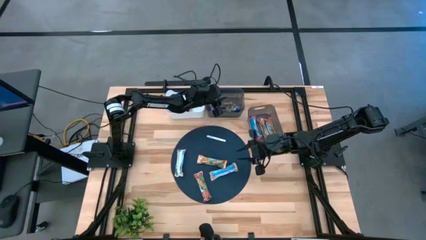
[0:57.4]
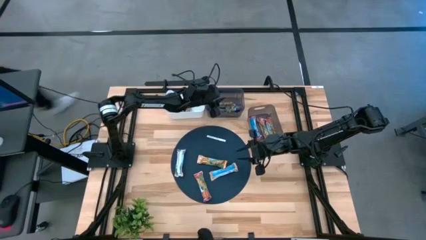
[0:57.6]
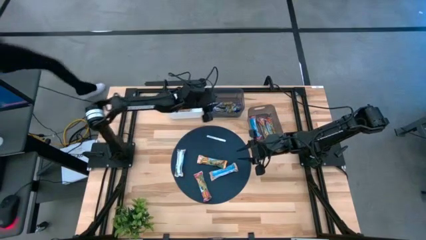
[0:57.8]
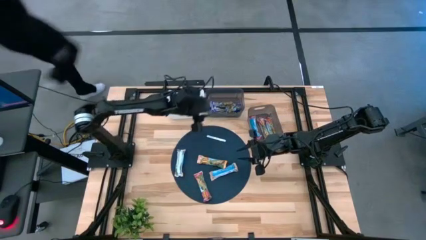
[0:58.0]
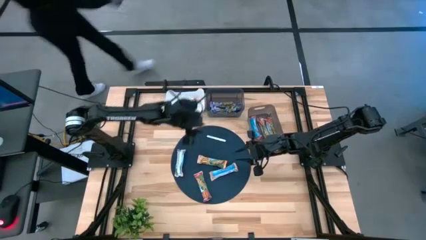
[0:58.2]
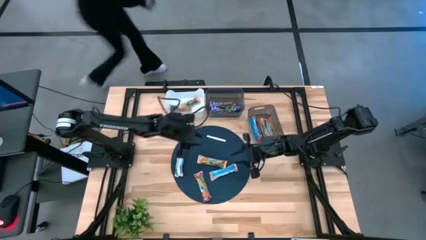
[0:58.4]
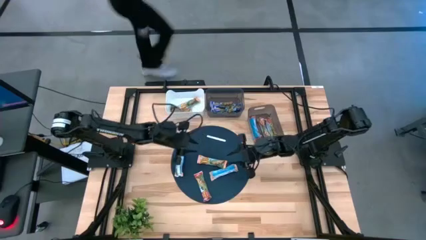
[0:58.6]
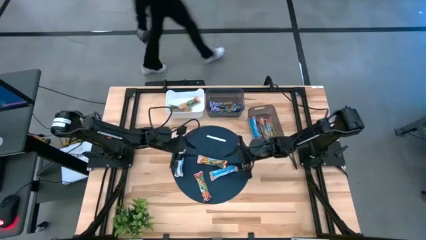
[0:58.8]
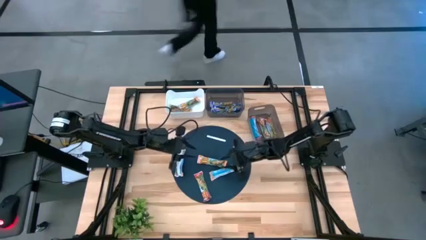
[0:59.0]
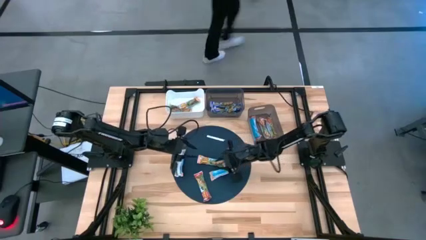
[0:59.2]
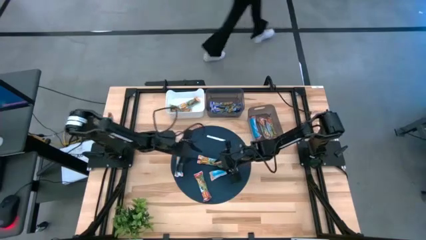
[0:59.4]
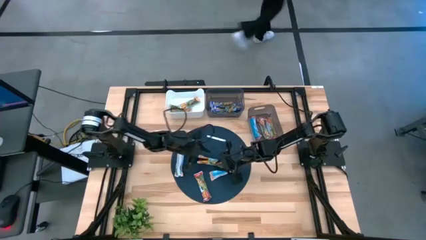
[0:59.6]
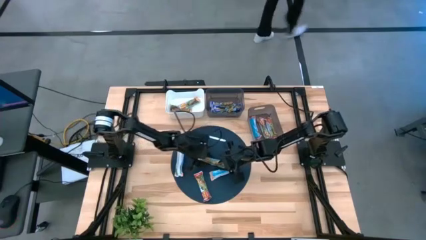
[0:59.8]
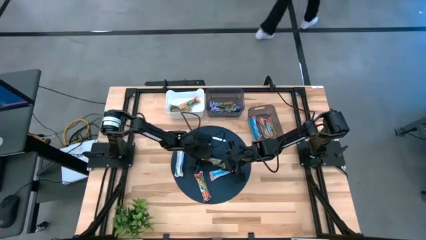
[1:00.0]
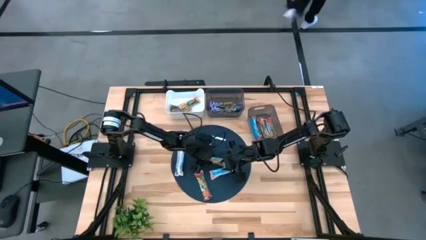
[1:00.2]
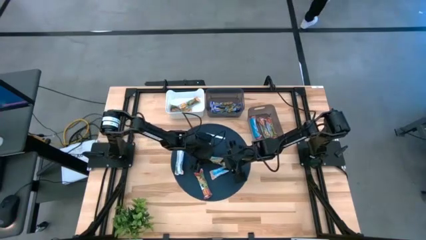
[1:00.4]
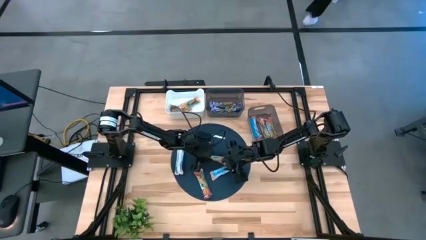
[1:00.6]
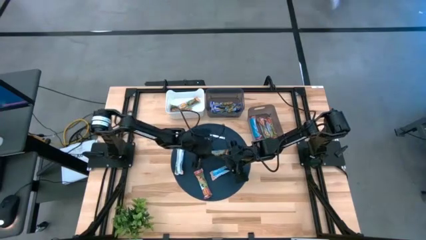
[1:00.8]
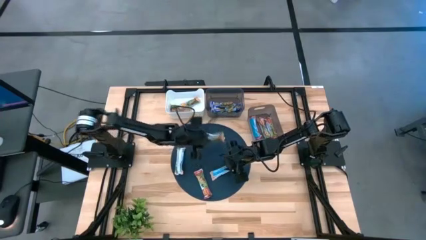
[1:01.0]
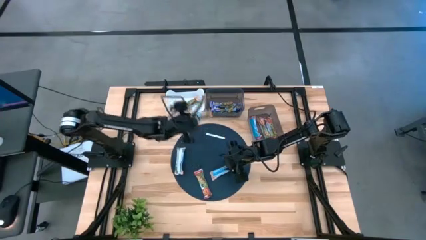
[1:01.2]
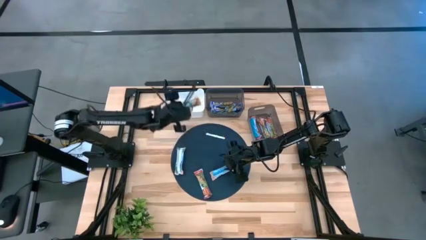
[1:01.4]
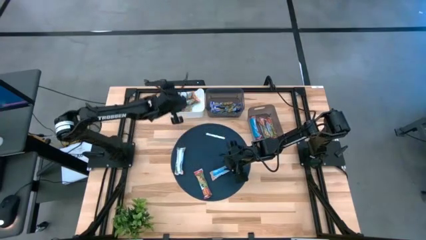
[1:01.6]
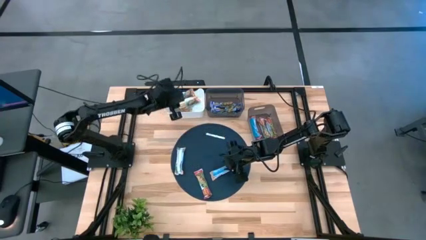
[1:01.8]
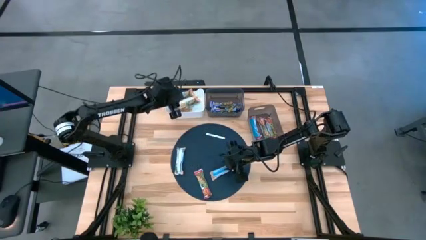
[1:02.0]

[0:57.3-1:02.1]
Task: Pick and place Granola Bars by type
Put the yellow granola bar into the white bin

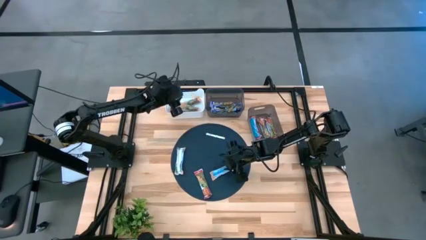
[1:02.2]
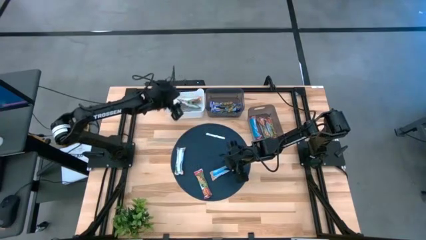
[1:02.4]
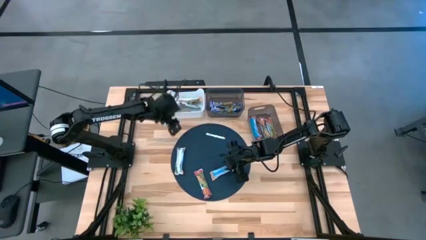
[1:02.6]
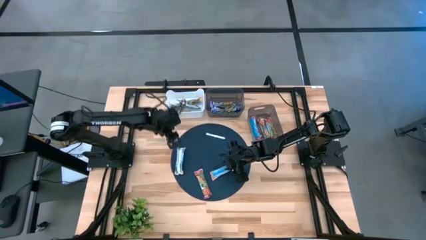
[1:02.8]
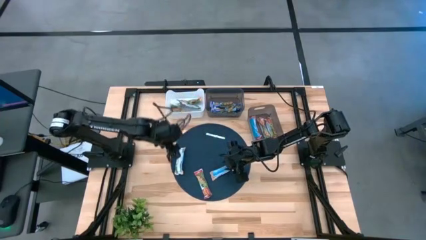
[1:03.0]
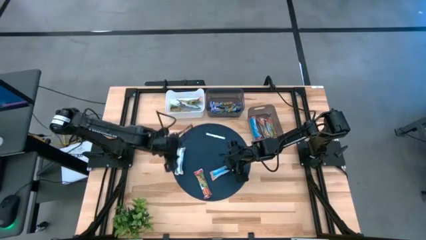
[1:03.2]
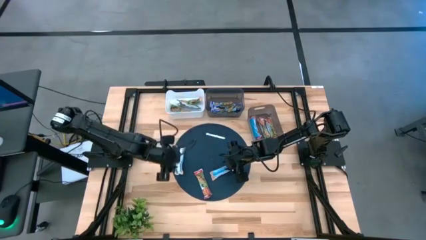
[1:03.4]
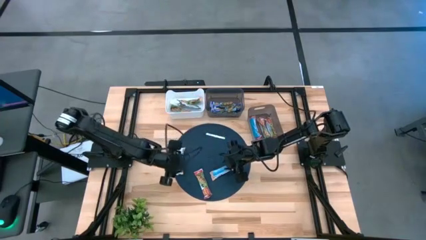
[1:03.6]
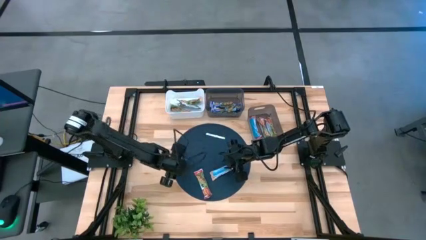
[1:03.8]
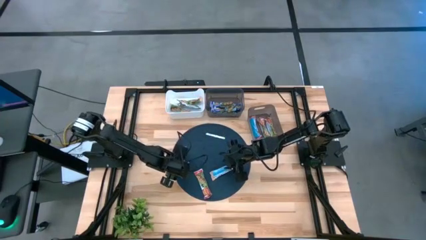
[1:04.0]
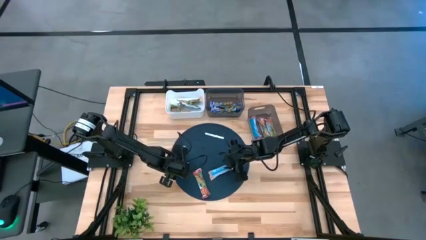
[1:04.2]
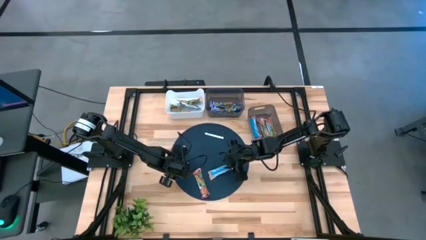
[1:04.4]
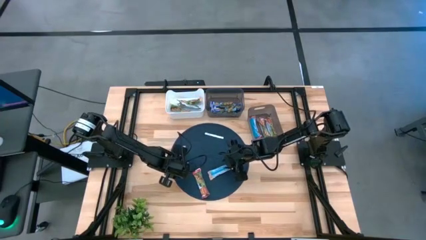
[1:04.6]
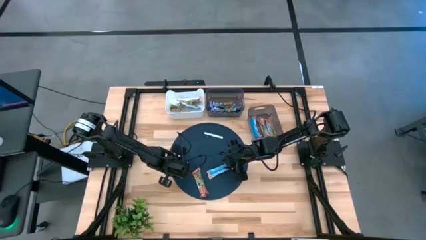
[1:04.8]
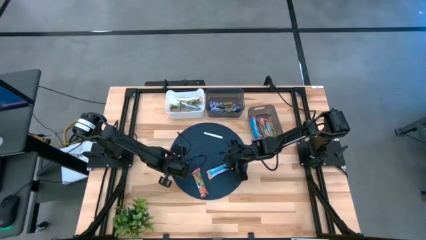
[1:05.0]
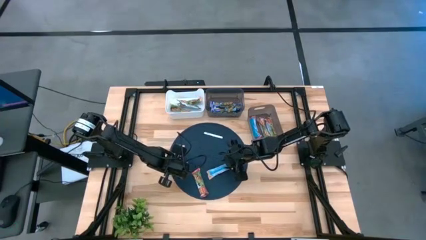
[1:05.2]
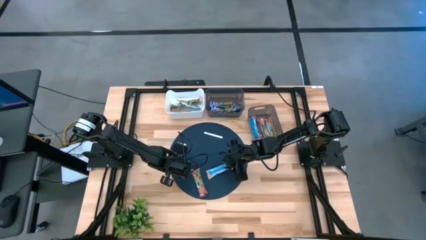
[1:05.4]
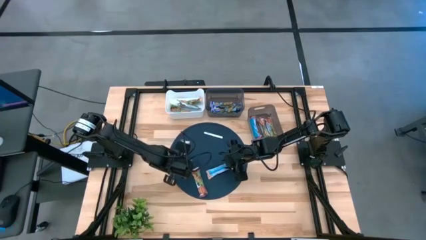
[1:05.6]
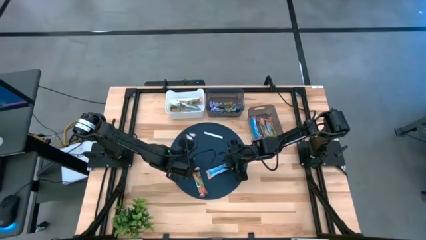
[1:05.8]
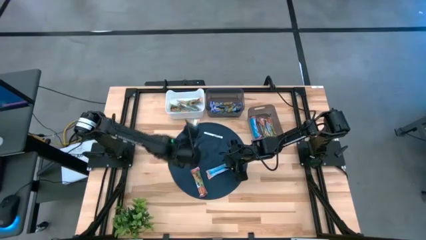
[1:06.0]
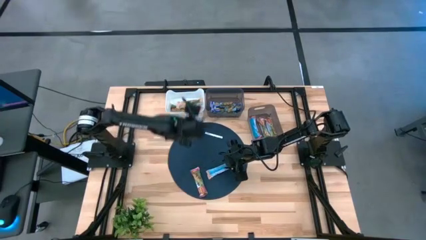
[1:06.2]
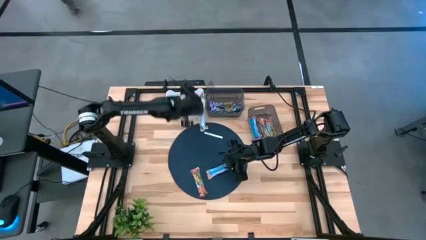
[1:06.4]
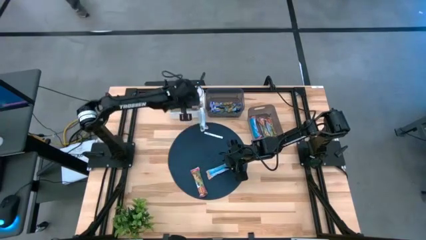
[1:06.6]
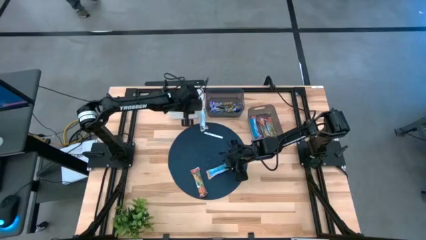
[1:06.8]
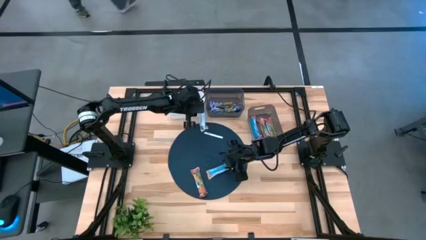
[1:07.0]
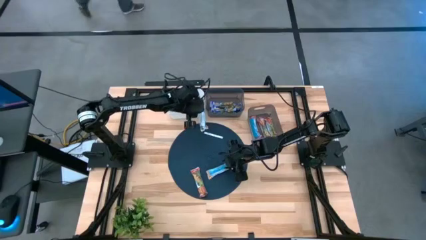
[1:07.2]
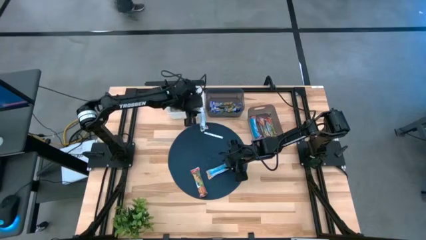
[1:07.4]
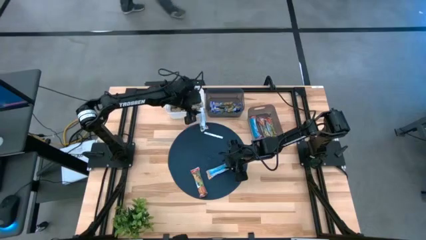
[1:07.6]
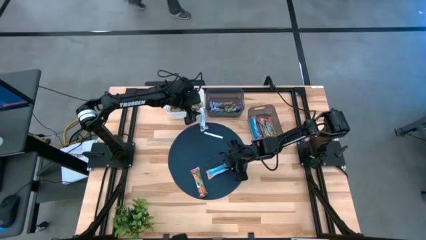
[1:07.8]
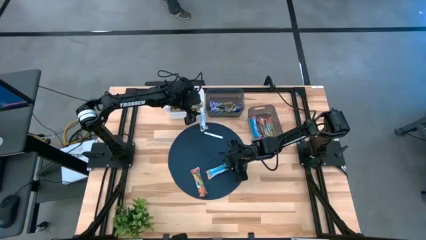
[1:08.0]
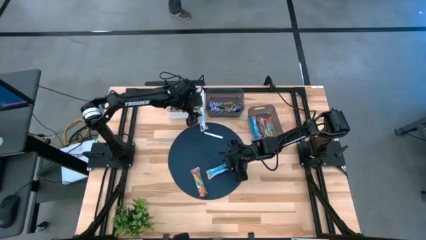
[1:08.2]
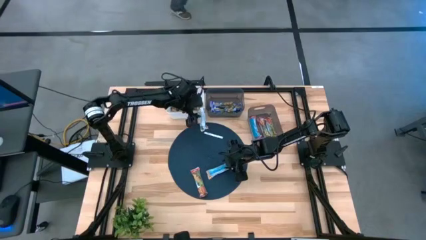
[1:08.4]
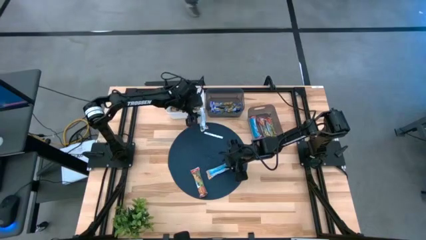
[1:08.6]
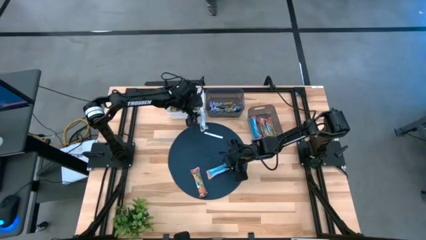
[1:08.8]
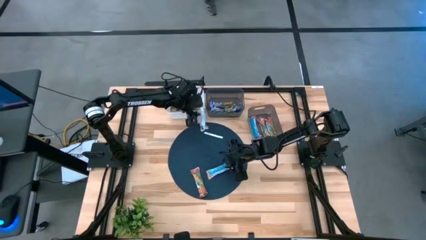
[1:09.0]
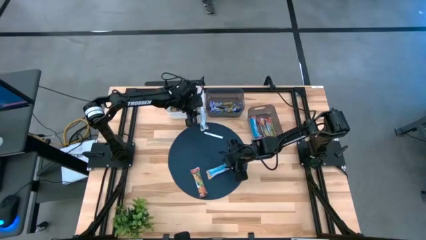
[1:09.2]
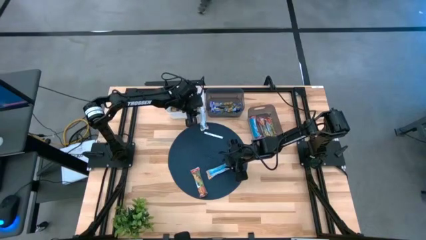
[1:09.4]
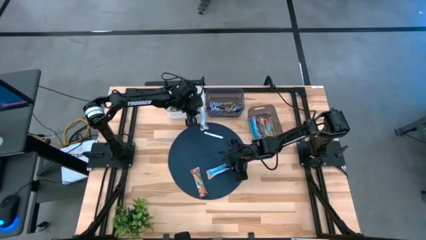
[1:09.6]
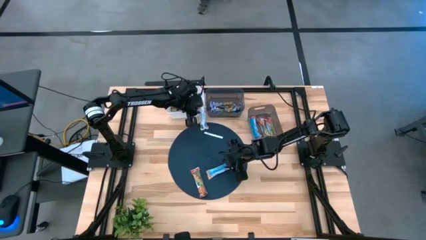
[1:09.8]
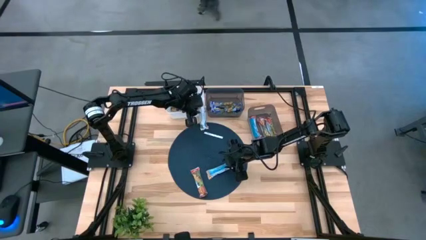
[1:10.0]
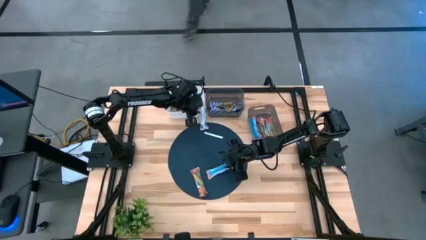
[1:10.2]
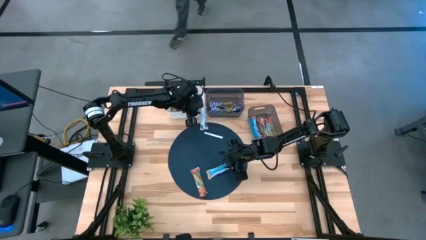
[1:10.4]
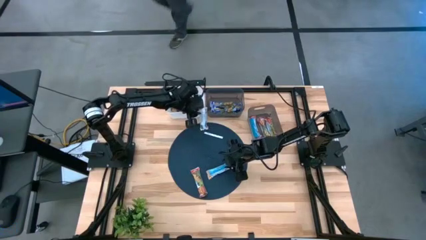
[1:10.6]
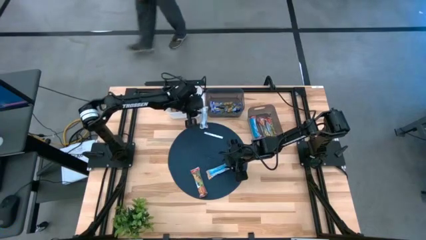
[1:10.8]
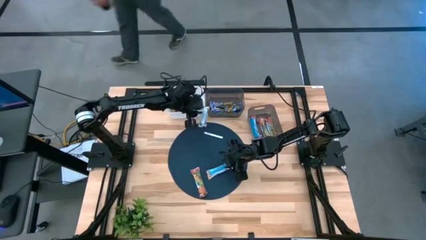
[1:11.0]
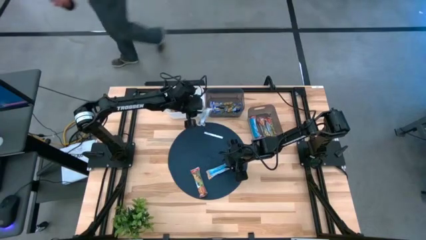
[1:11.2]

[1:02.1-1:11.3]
Put the yellow granola bar into the white bin

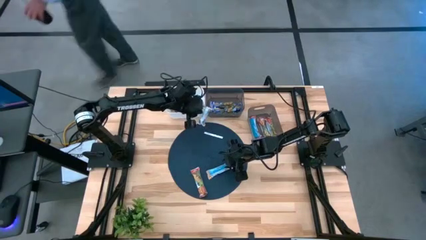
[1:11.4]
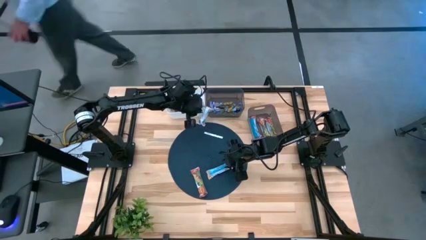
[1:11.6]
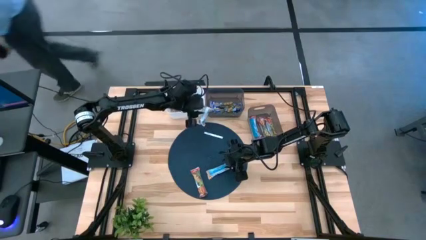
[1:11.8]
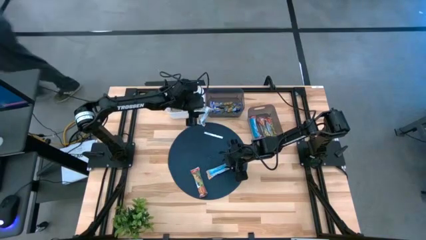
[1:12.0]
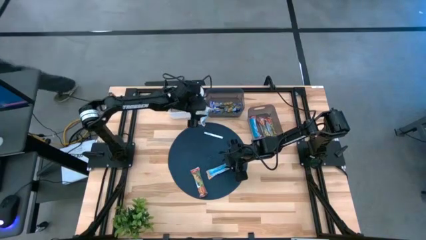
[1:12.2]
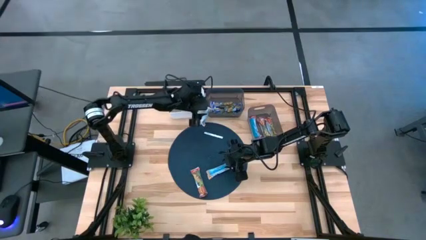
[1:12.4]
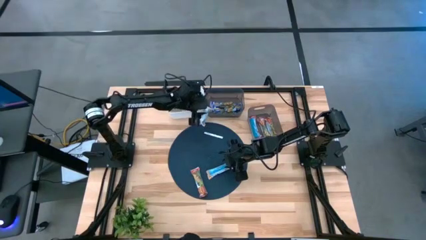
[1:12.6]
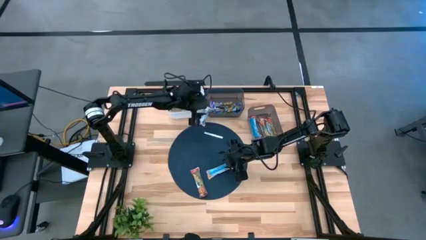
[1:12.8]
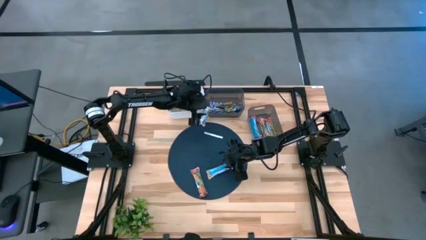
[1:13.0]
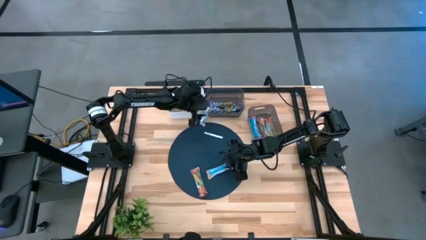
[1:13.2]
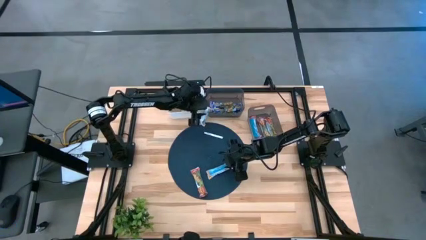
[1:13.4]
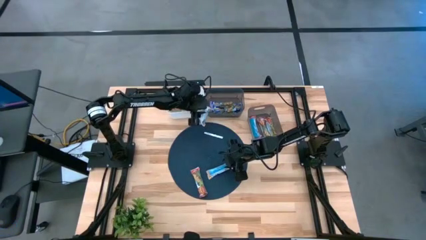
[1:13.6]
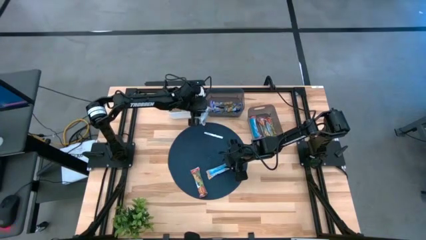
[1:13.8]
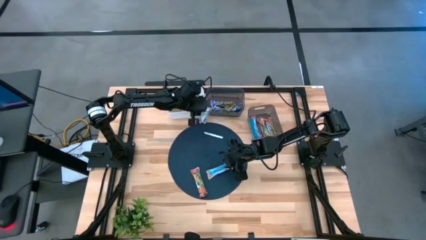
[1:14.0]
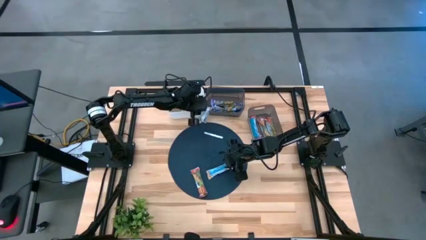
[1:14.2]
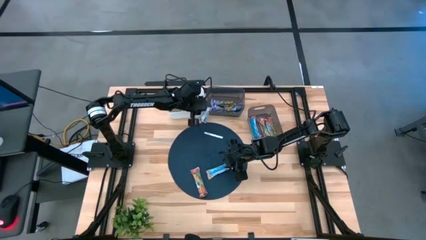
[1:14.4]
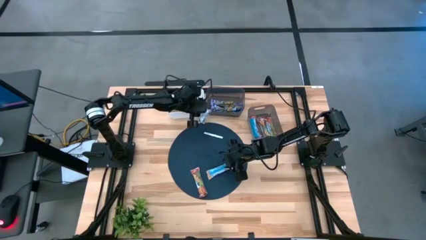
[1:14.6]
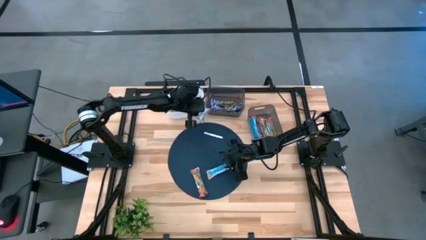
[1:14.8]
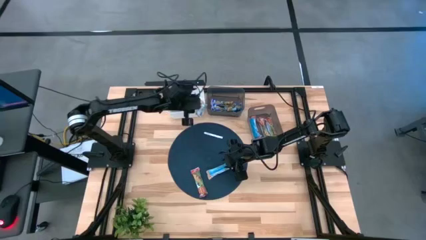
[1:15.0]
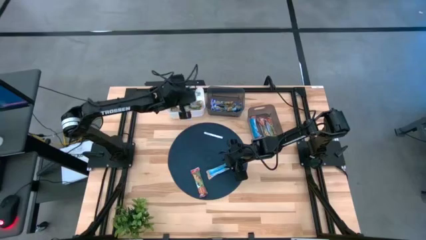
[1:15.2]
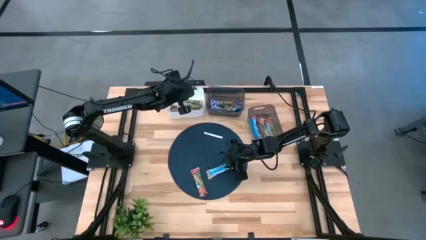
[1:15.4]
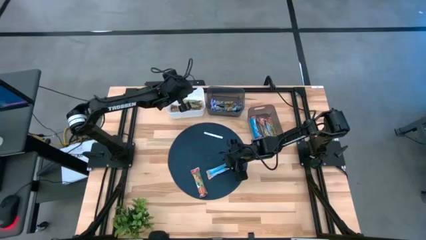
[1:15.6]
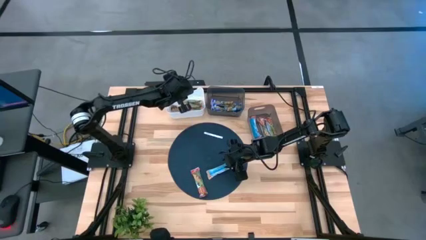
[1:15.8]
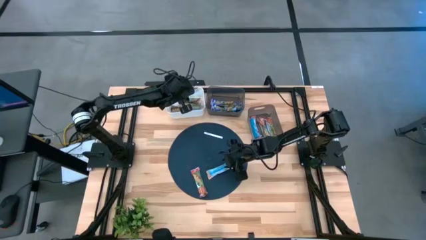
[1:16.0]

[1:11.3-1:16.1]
Put the yellow granola bar into the white bin
